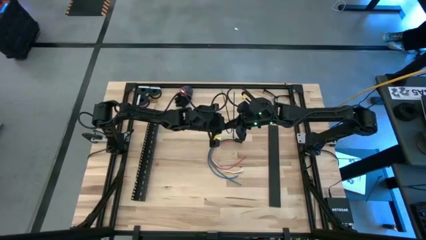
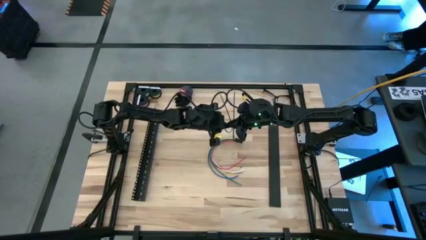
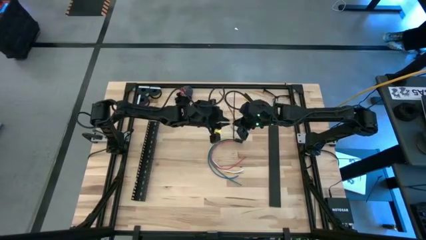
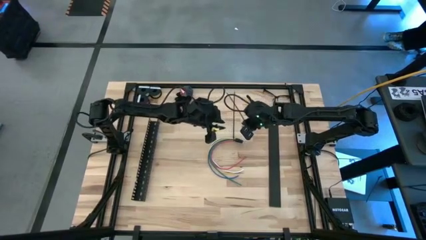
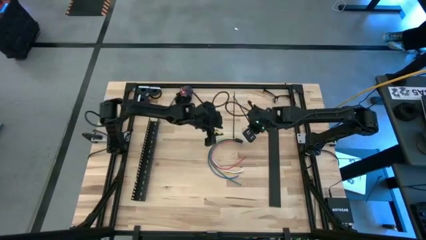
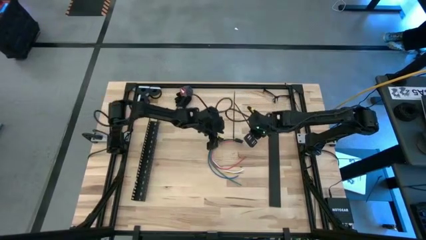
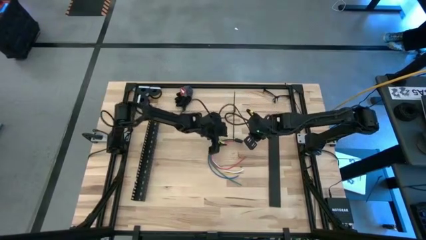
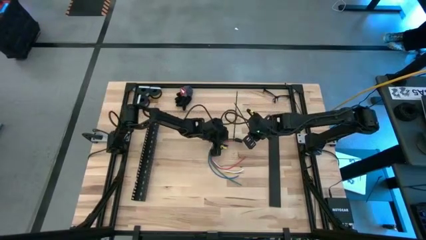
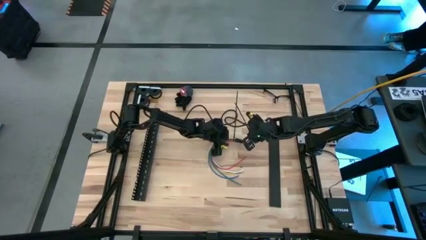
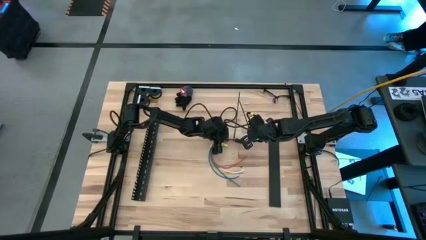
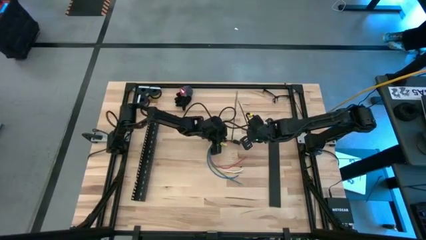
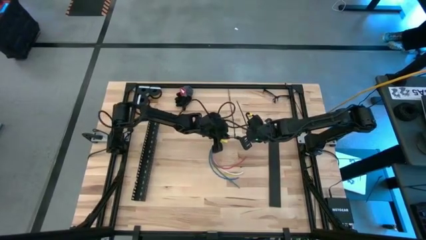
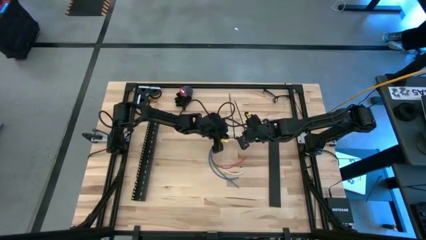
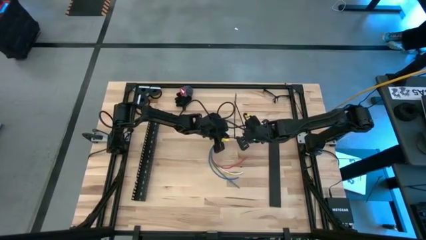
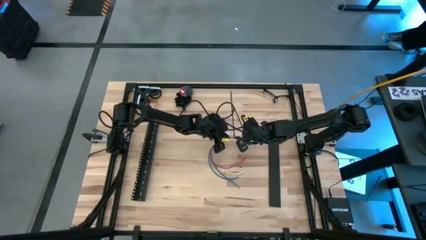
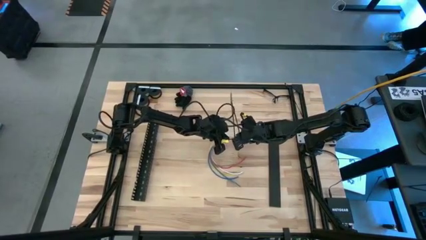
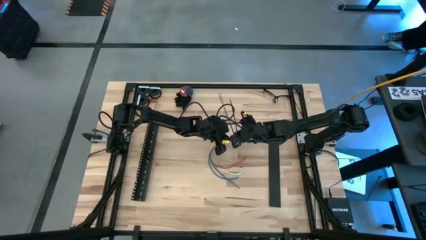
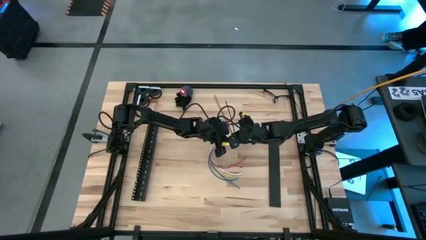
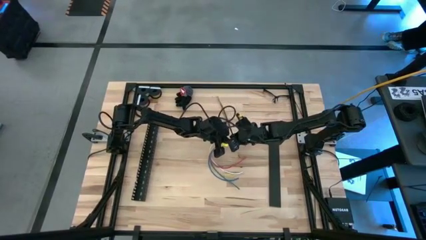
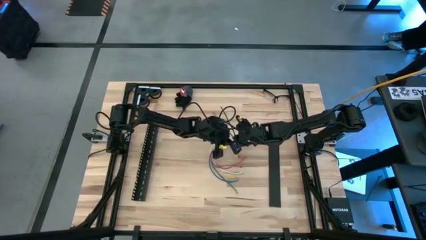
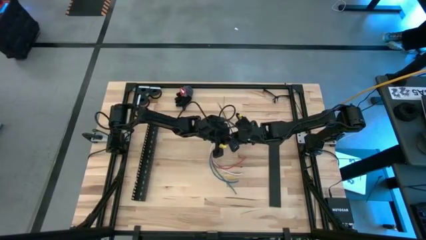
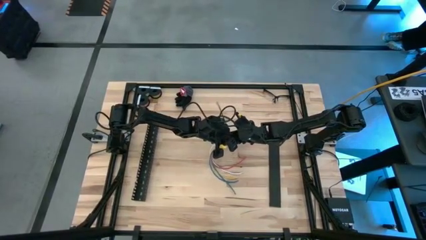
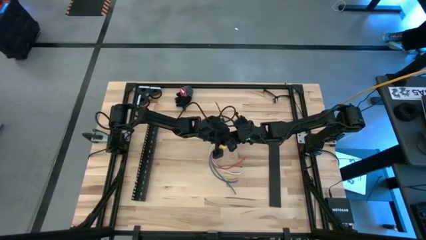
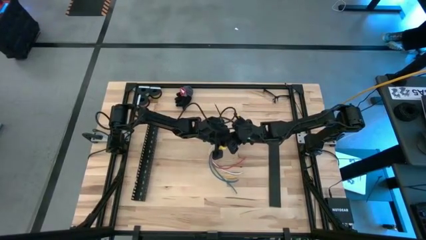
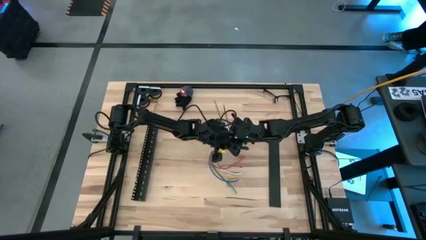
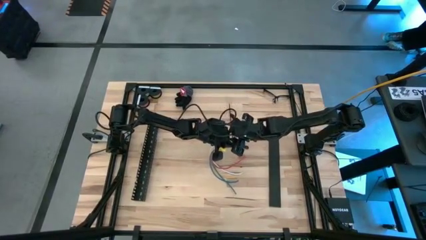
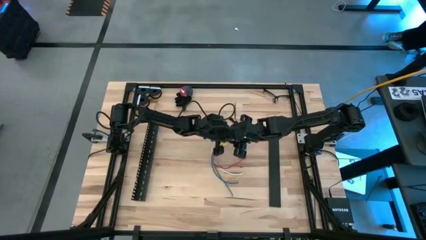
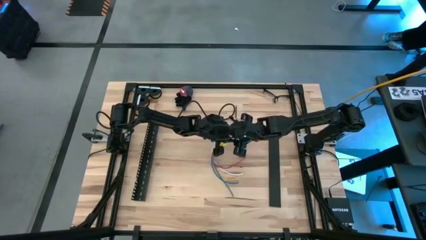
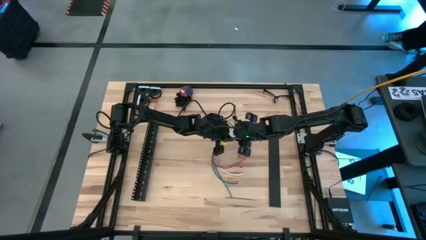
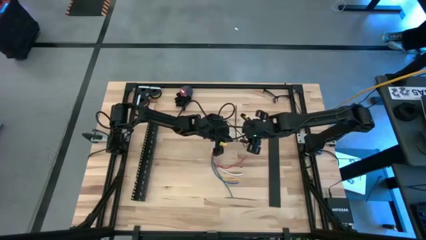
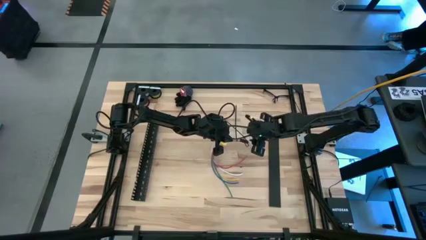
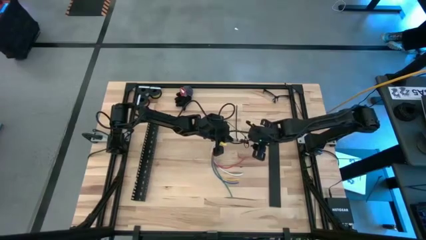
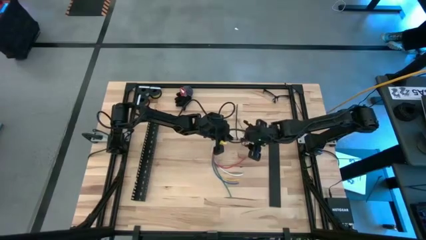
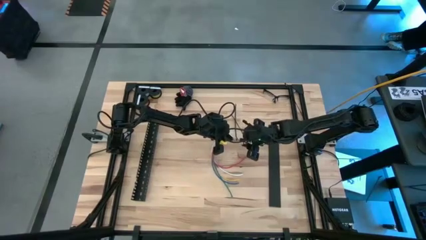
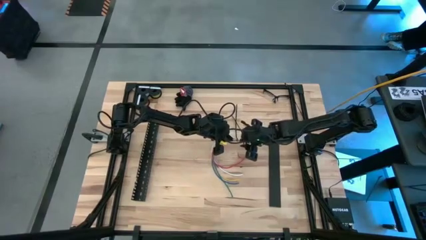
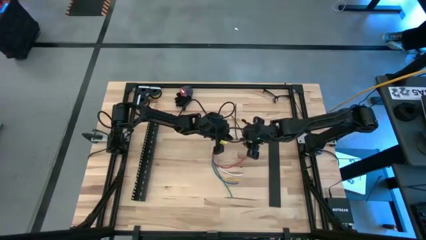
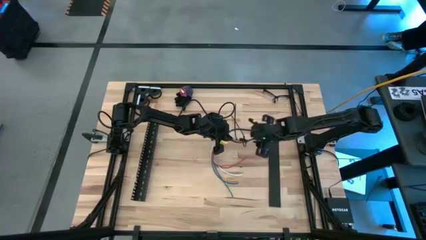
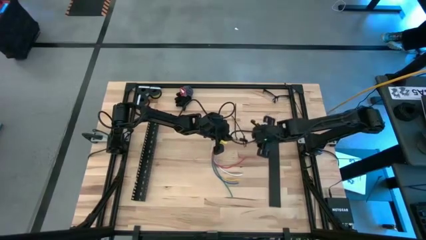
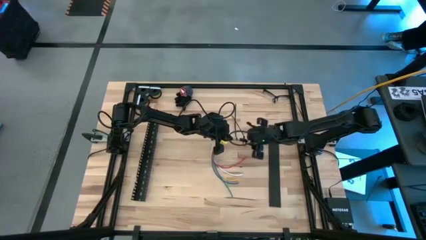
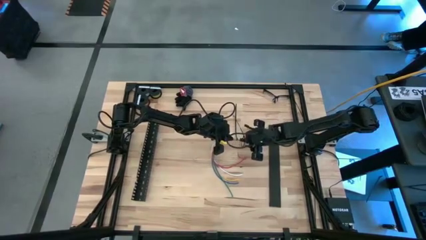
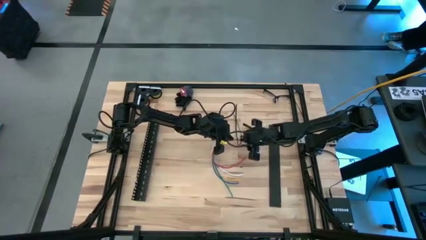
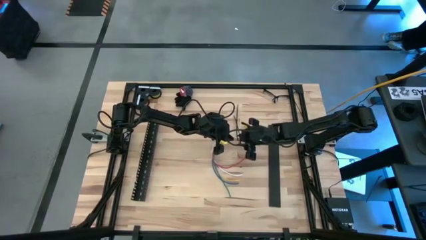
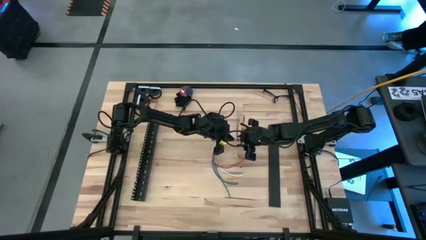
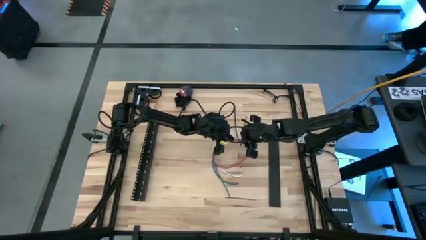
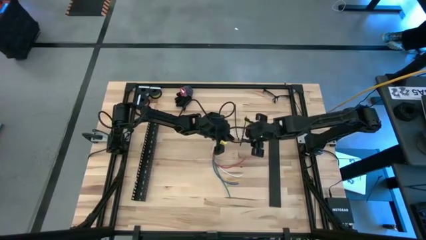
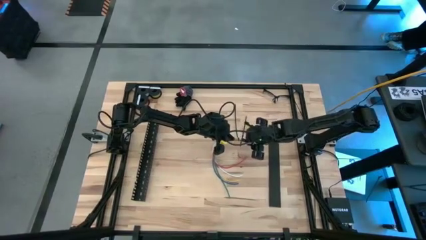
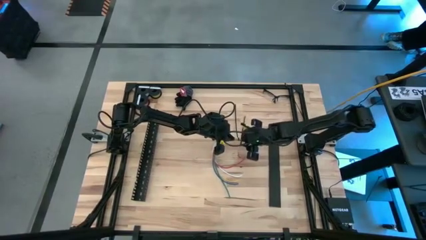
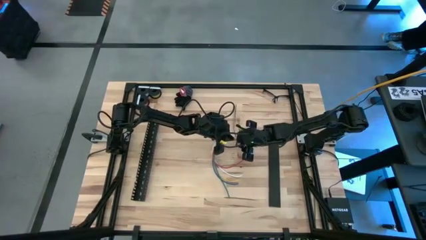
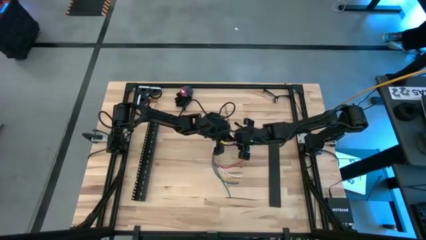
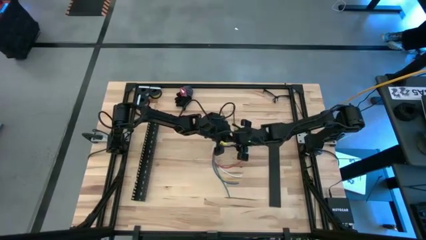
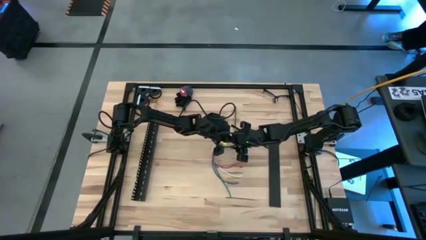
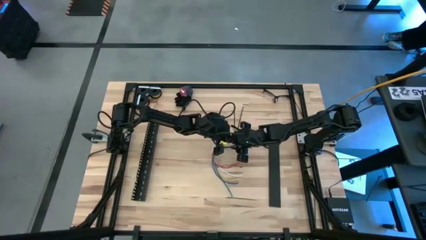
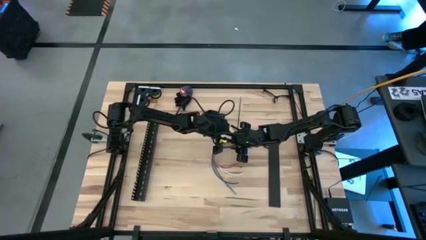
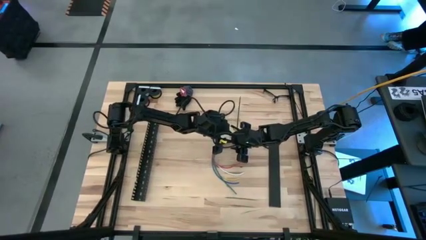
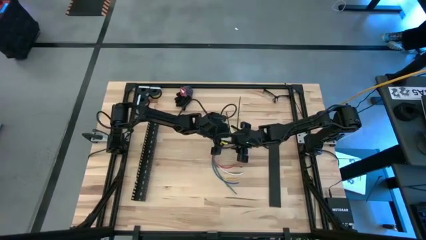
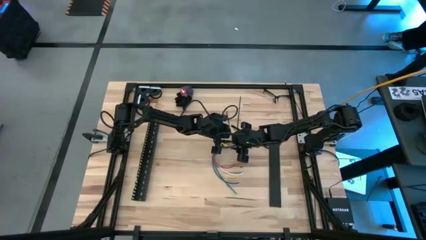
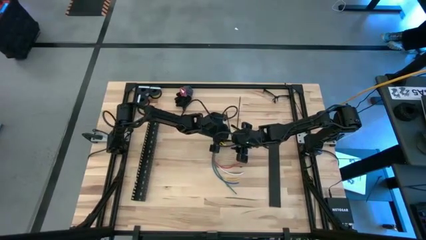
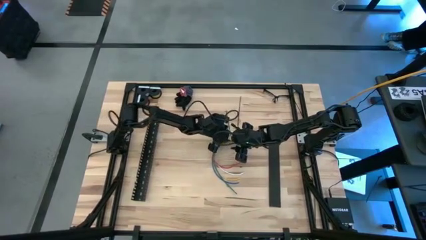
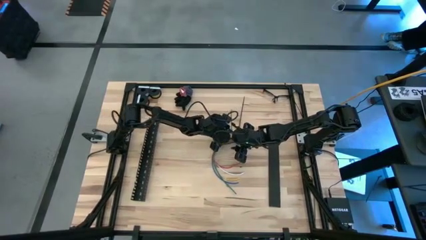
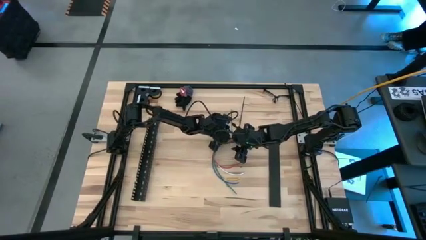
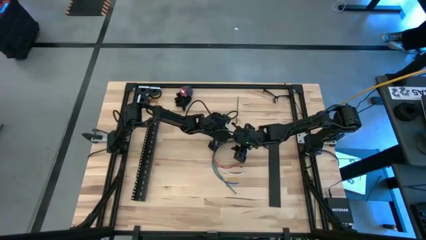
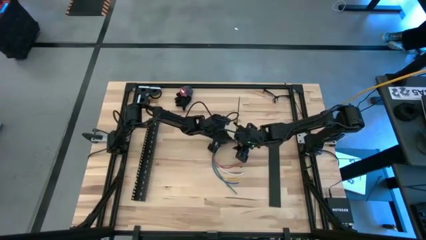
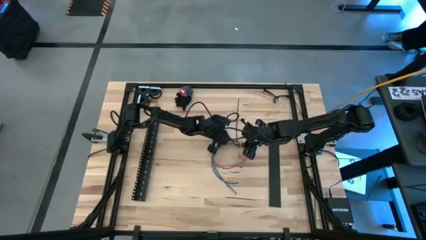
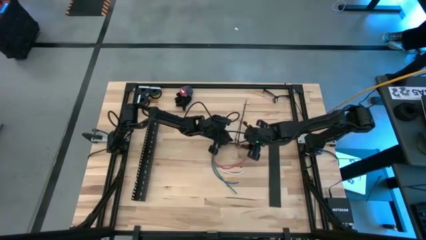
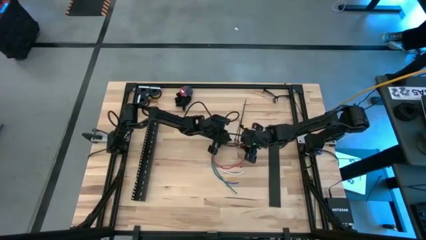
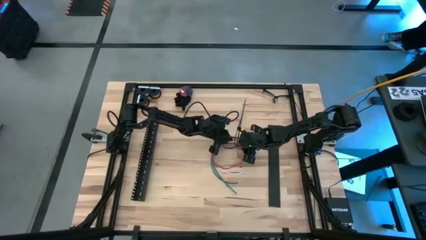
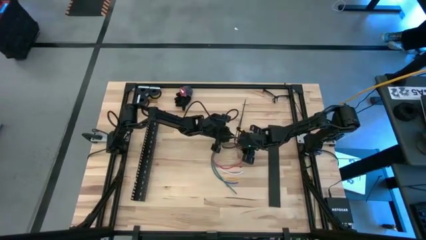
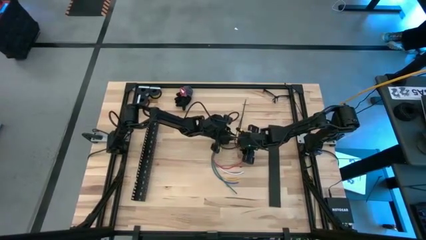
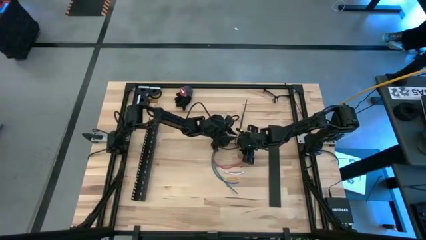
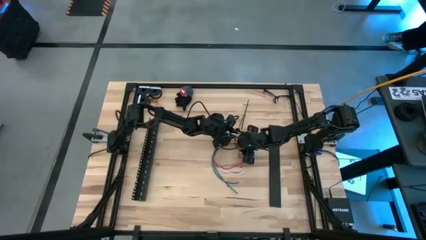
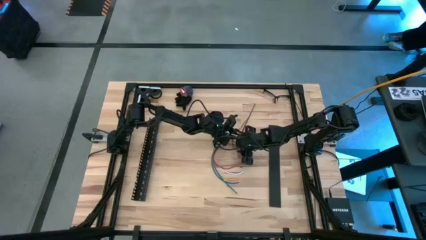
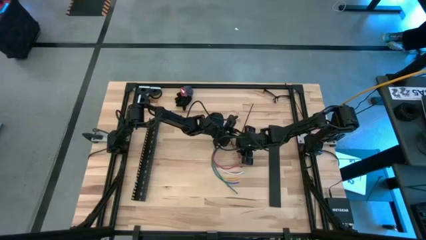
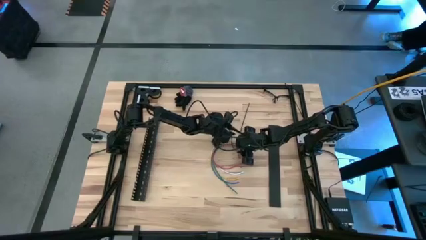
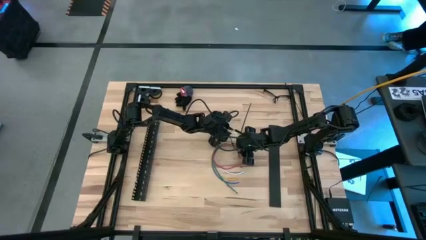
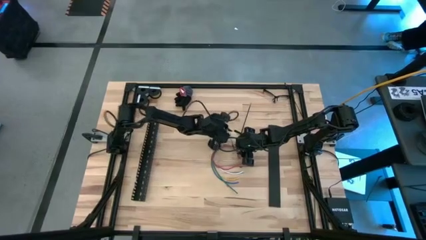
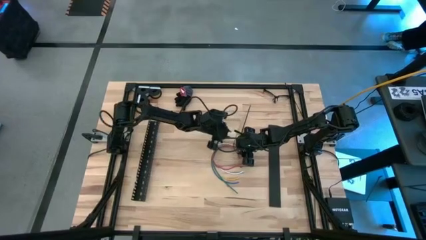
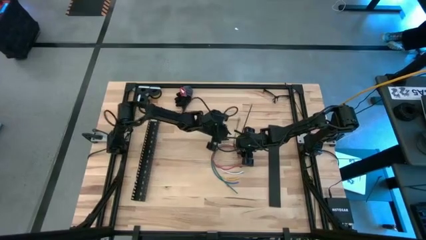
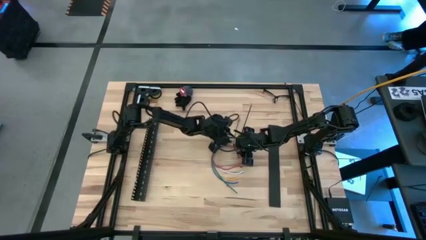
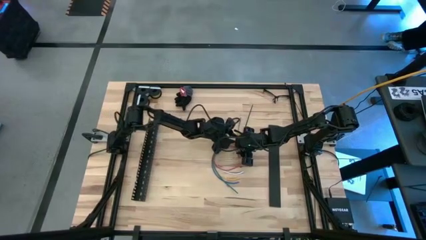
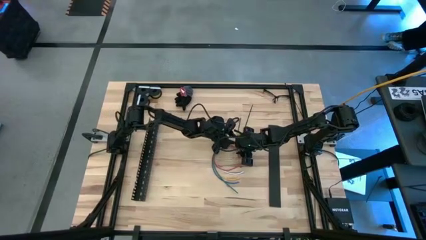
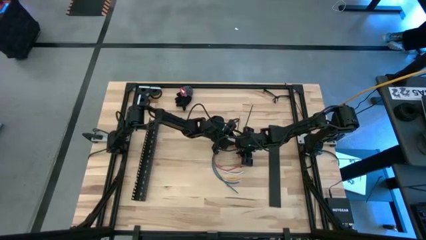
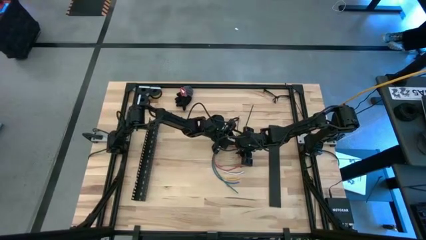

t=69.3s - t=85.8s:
Task: Ziptie cables
Wrap the cable wires with the black zip tie
